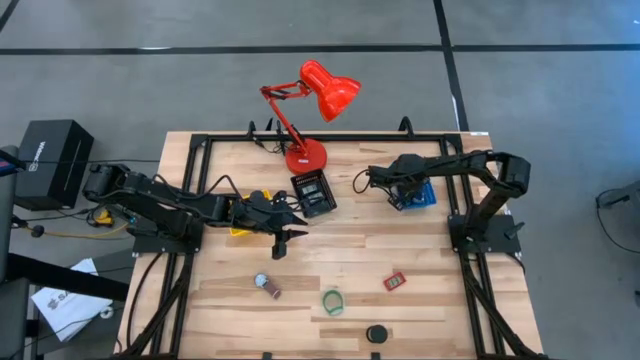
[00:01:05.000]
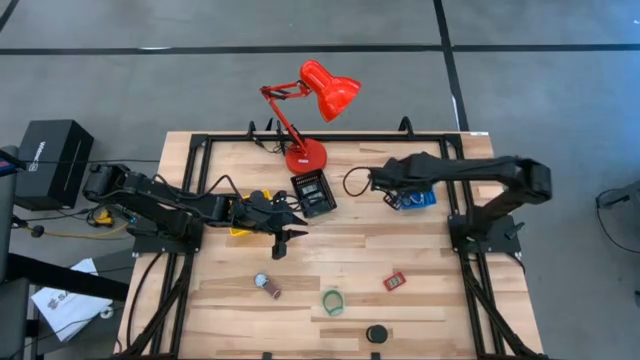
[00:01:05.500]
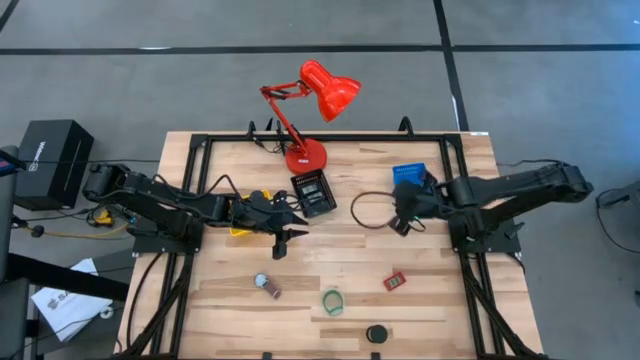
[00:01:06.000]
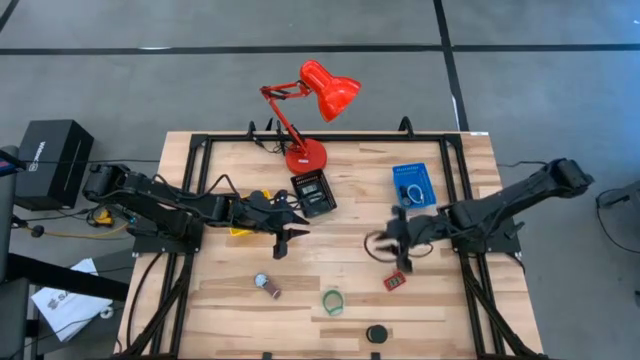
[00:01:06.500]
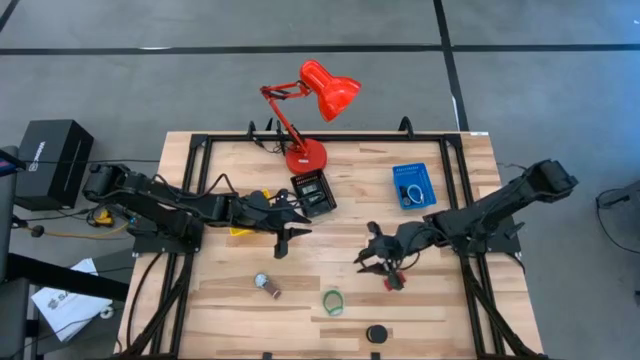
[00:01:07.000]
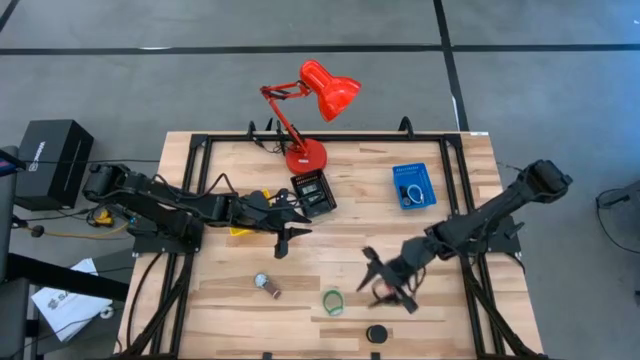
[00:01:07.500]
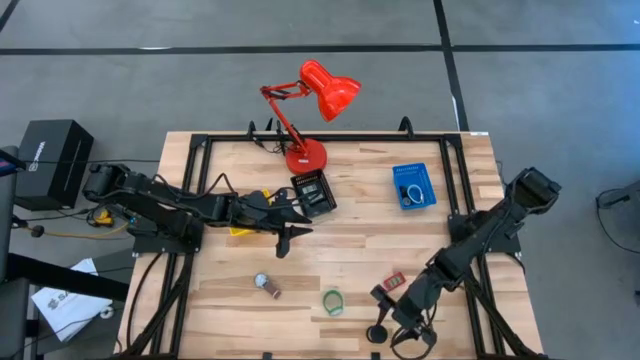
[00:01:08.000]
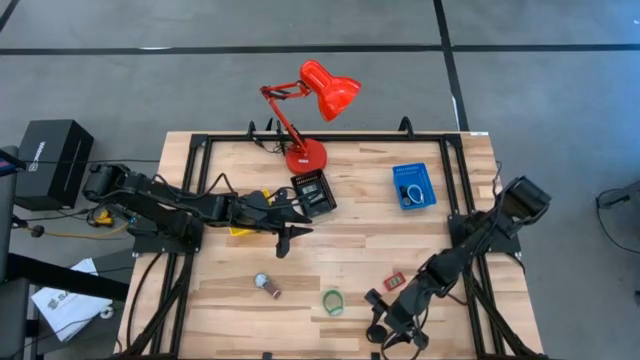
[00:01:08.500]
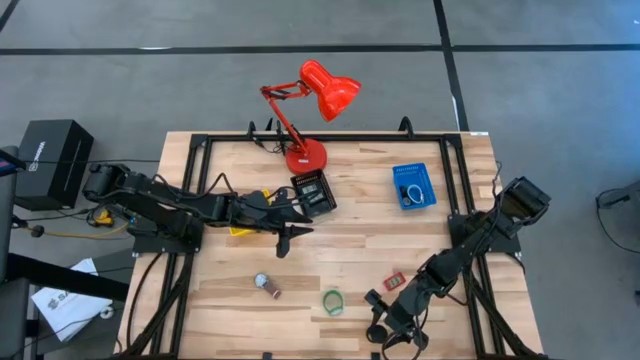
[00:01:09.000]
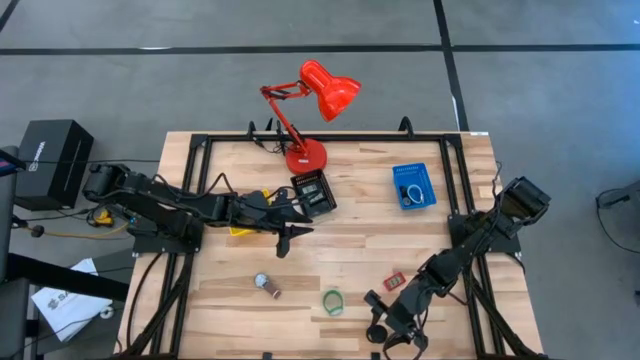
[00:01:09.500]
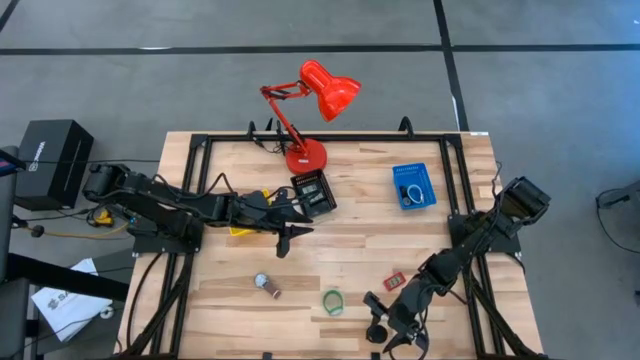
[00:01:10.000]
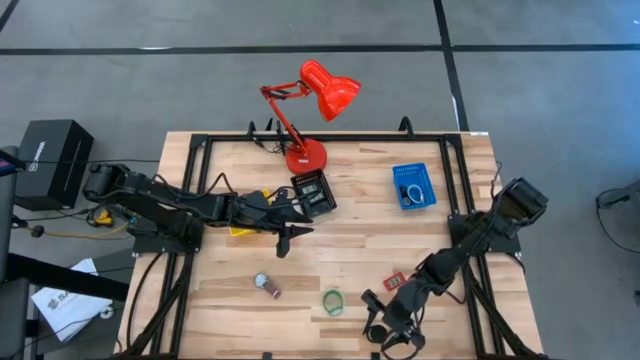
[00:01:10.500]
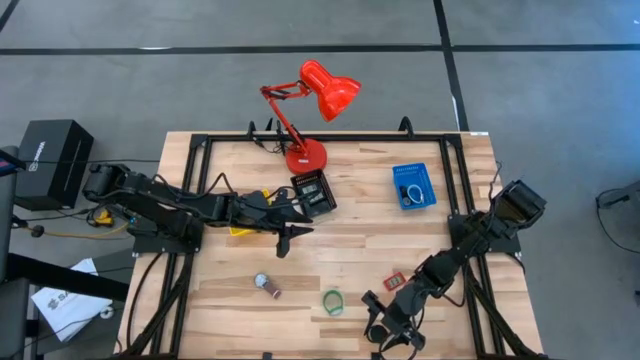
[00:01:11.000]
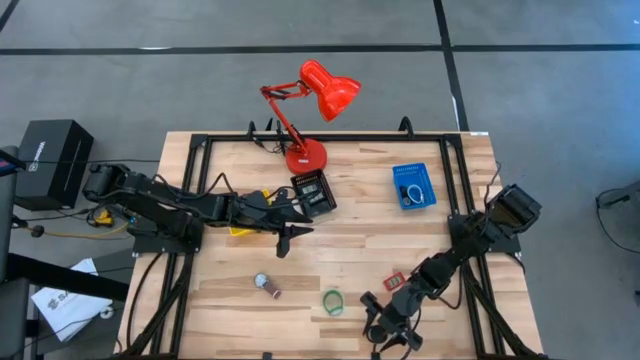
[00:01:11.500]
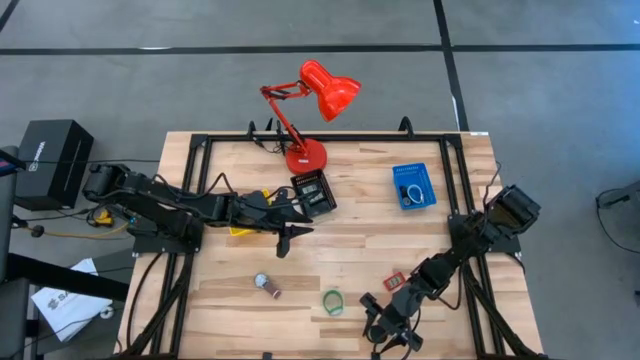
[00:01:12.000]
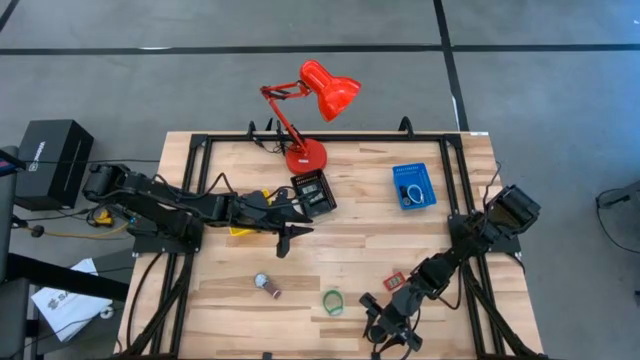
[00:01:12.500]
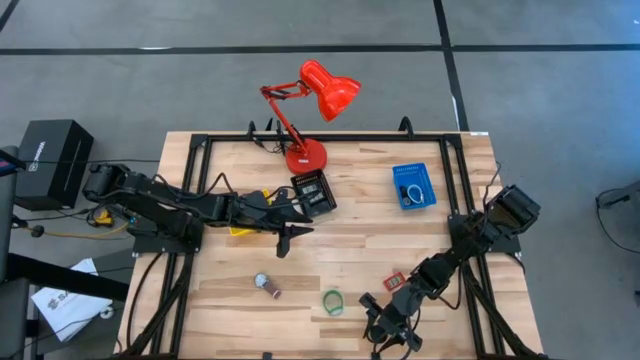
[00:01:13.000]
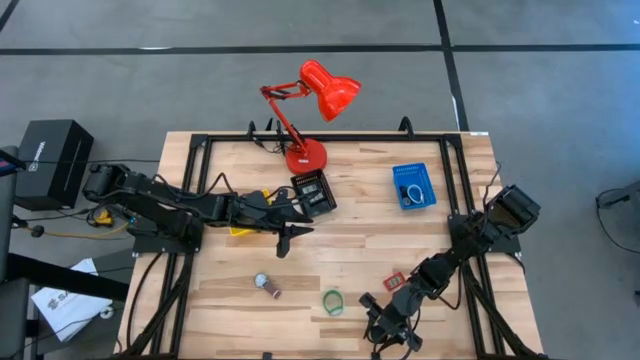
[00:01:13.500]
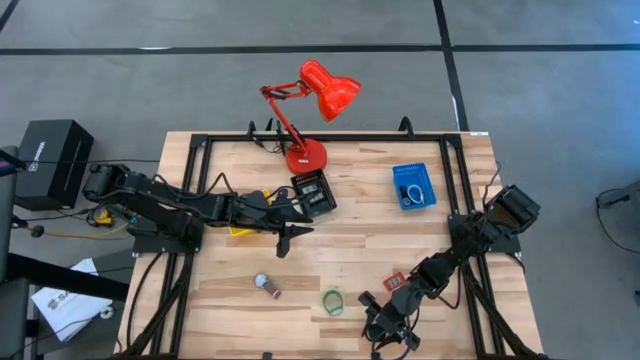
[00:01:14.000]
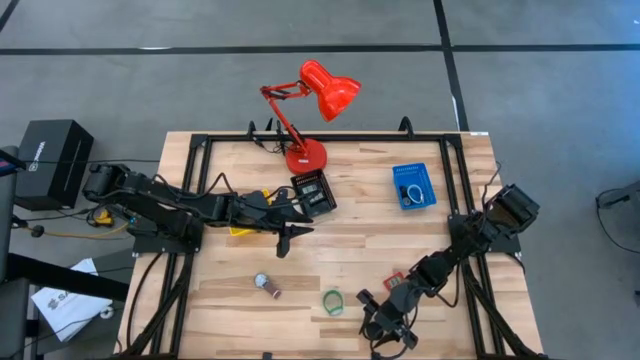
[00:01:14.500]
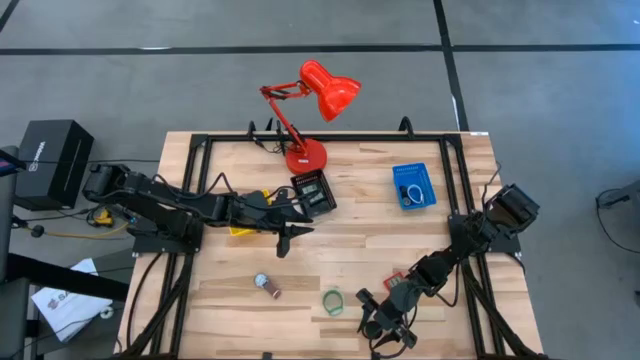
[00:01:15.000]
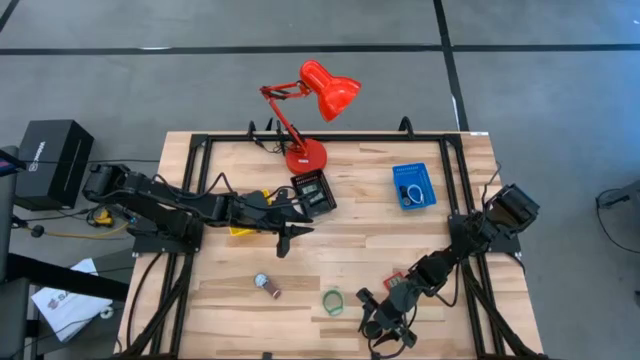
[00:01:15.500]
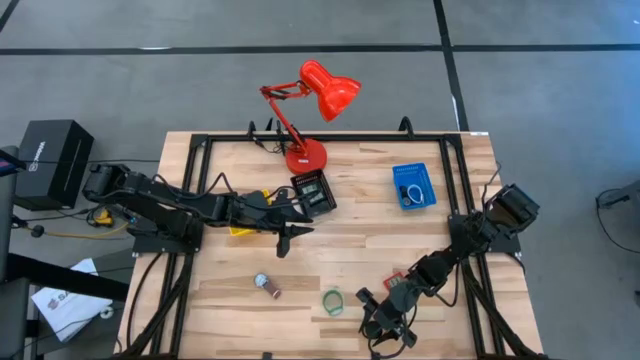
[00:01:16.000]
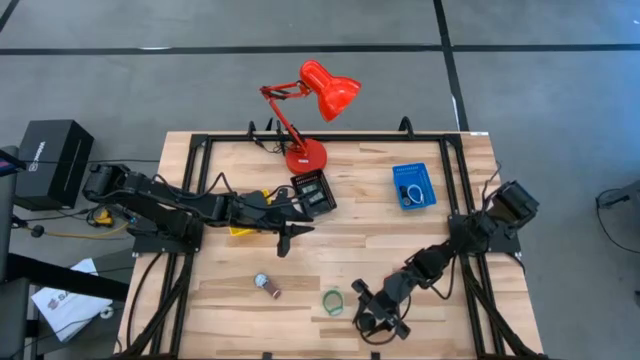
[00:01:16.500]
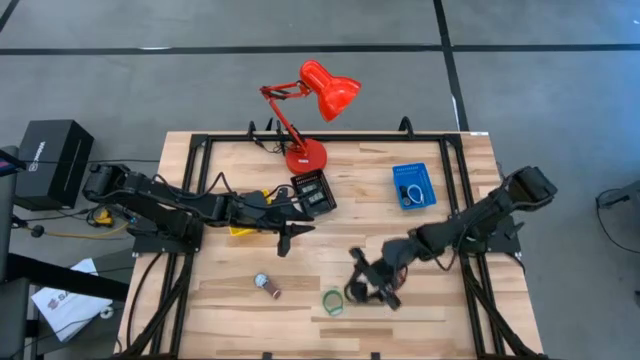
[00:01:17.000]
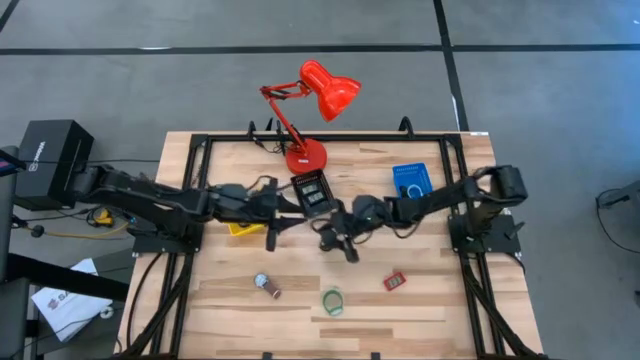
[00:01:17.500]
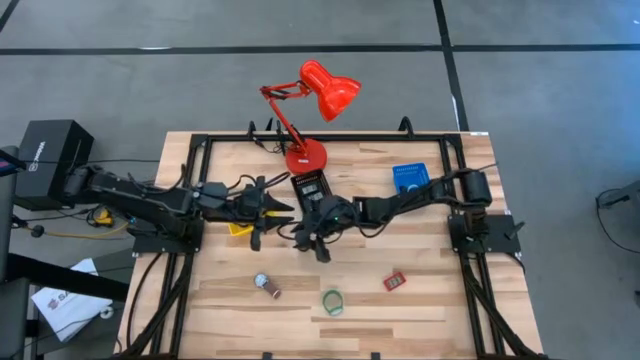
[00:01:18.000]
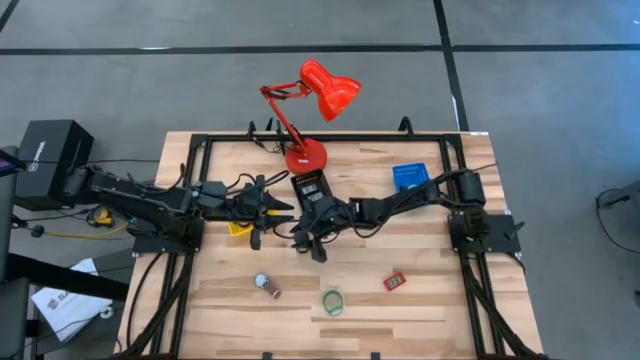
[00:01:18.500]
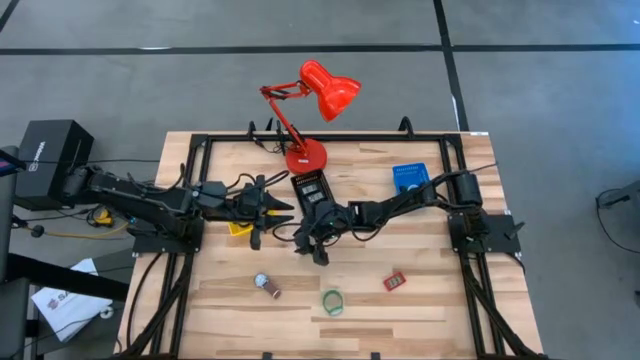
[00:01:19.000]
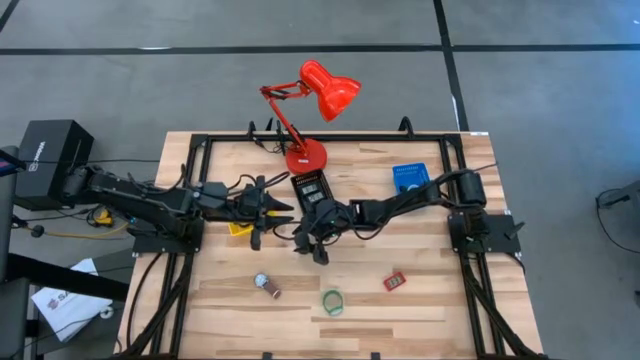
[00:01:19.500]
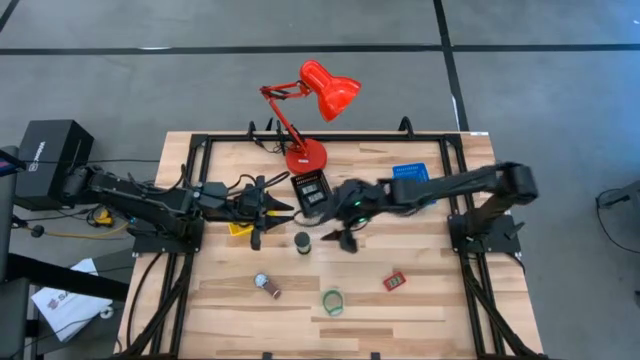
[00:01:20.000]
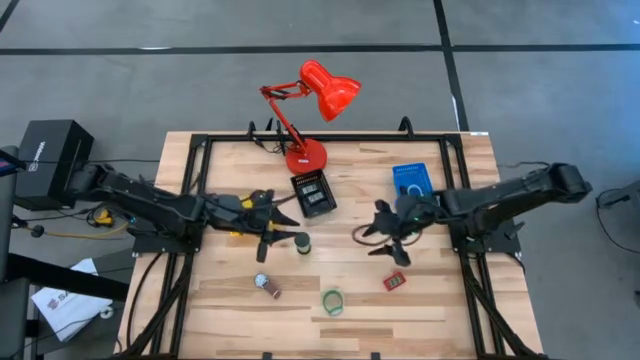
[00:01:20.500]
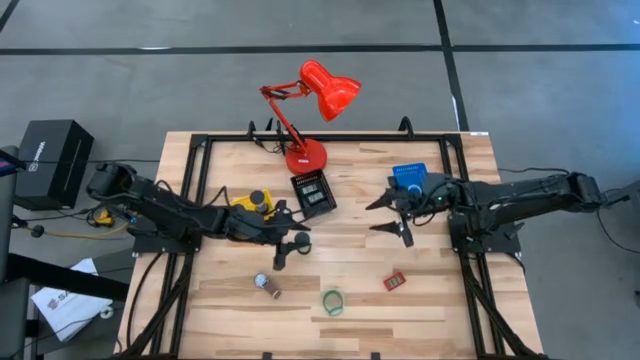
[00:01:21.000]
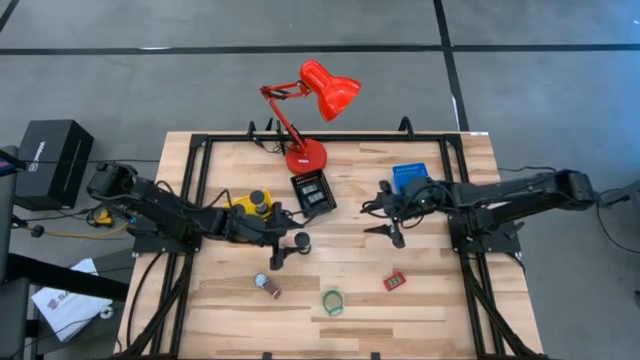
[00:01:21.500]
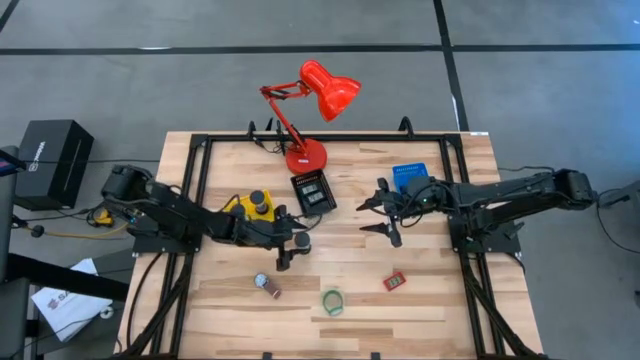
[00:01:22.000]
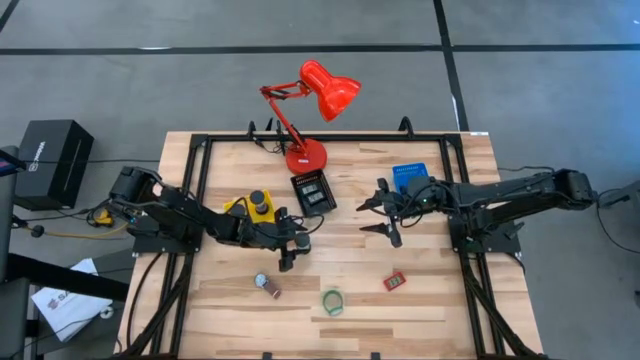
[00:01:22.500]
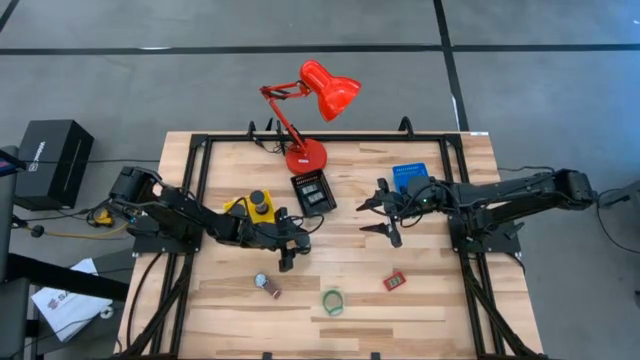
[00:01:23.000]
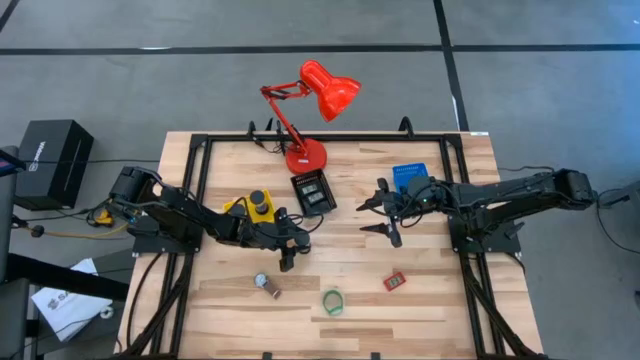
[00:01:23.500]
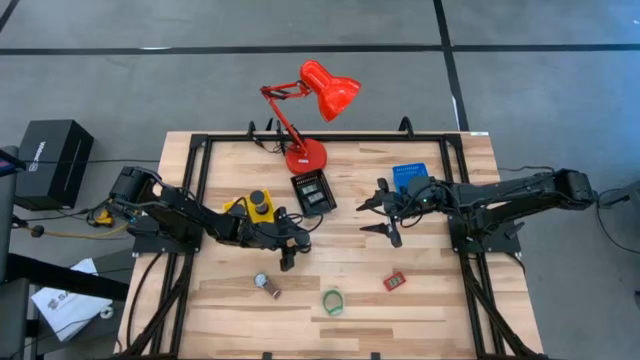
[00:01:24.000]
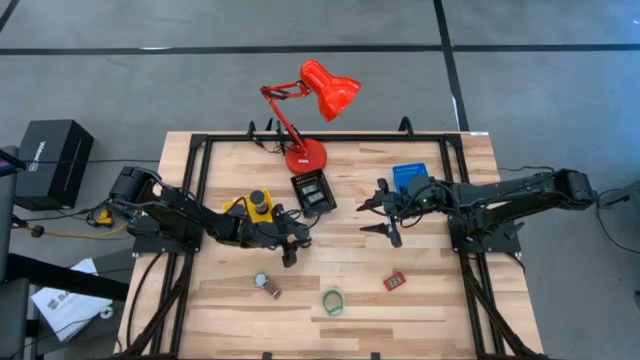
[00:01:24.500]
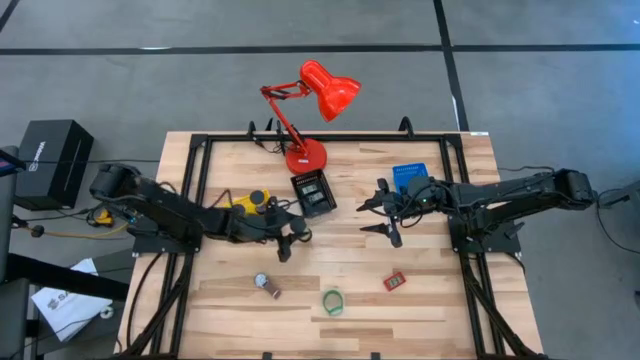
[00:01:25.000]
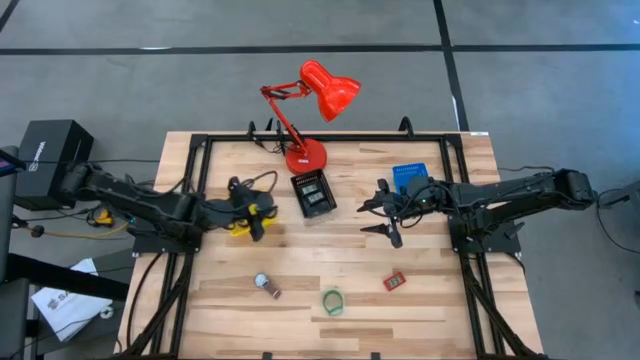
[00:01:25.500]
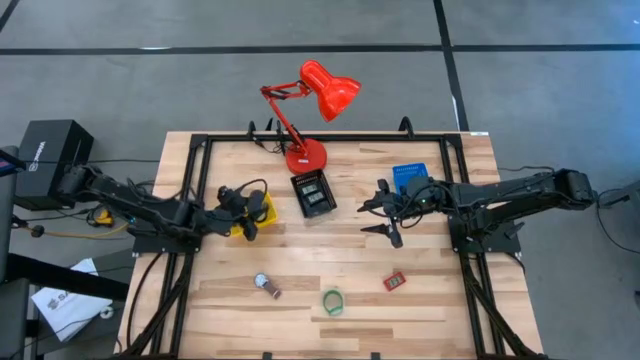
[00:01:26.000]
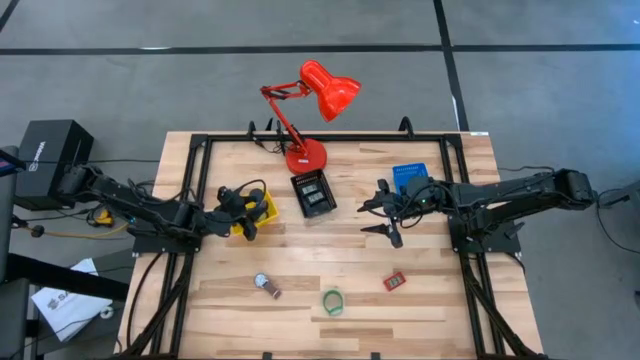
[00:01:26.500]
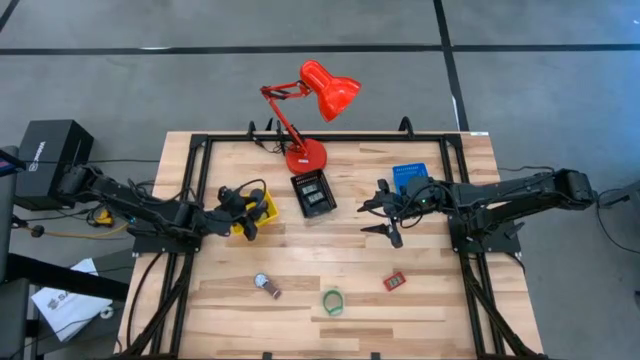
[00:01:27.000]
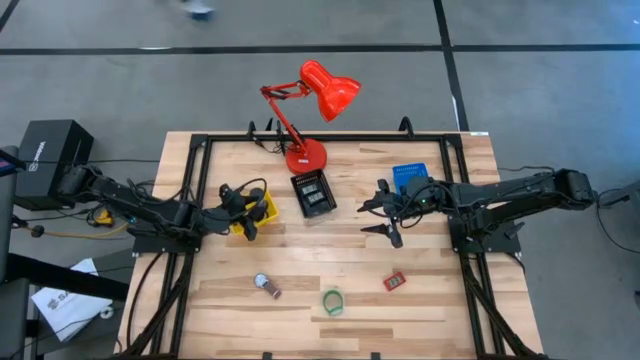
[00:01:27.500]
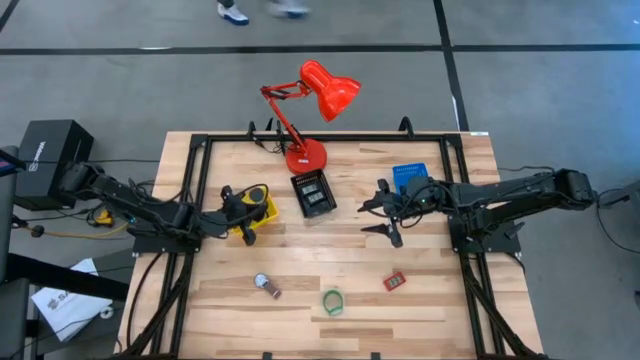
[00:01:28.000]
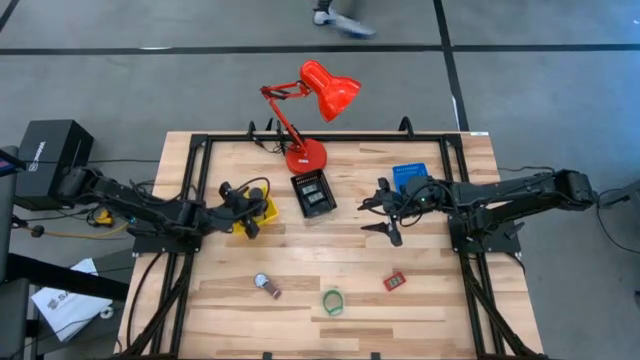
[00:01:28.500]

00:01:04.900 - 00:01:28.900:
Task: Pick & Place Office items
Put the green hourglass into the yellow bin
